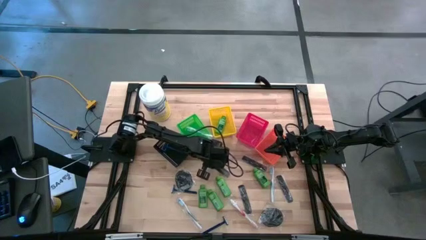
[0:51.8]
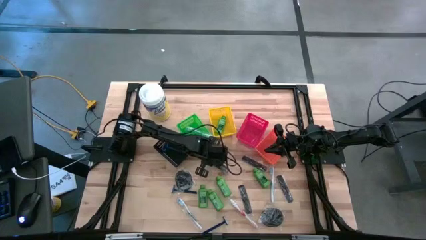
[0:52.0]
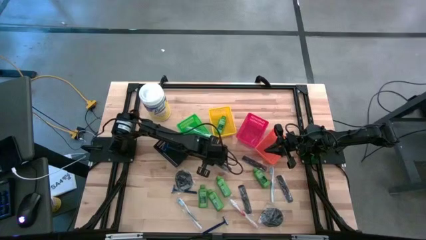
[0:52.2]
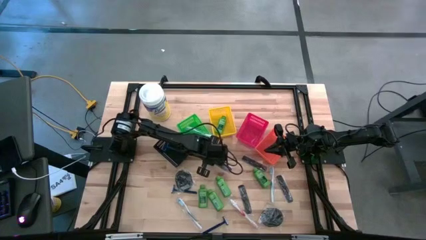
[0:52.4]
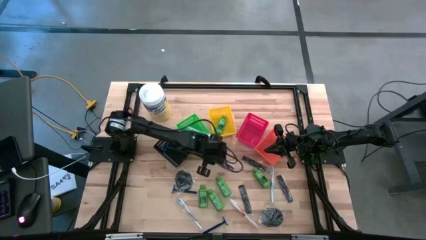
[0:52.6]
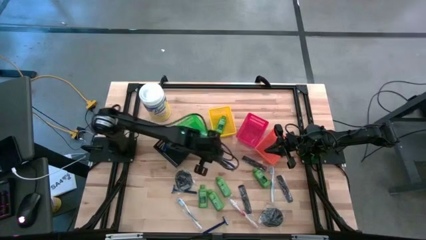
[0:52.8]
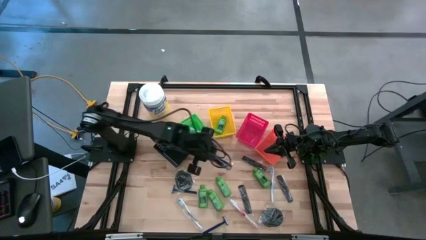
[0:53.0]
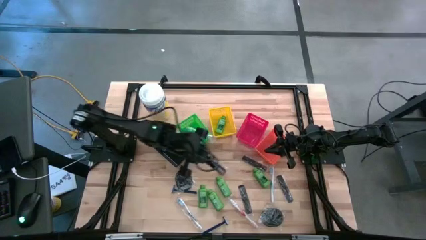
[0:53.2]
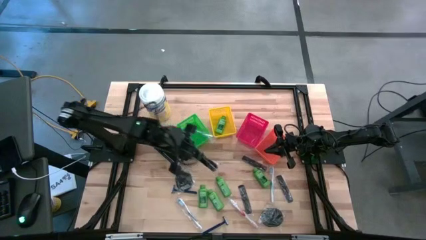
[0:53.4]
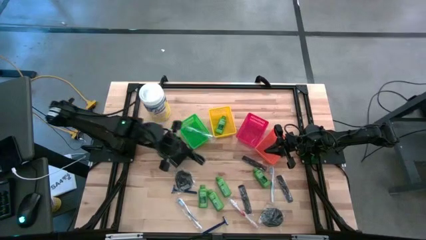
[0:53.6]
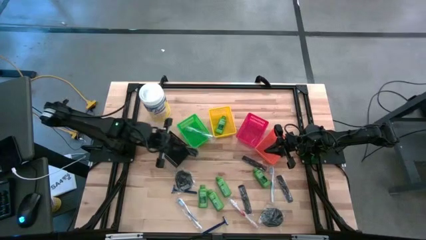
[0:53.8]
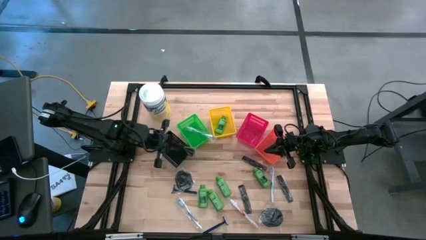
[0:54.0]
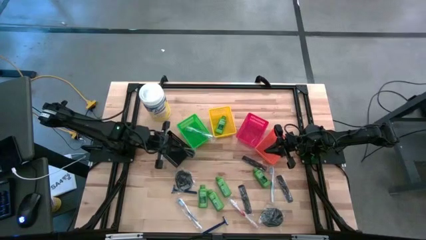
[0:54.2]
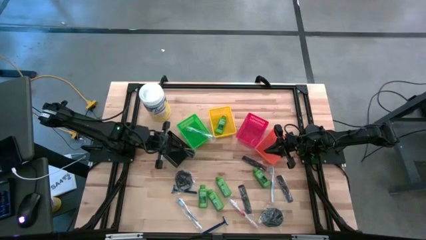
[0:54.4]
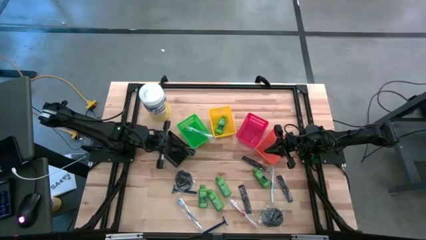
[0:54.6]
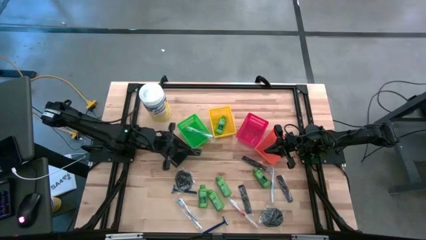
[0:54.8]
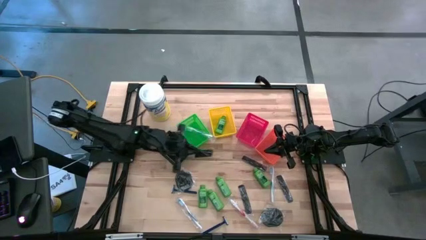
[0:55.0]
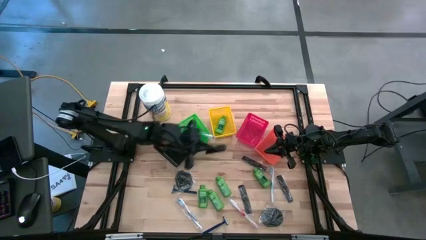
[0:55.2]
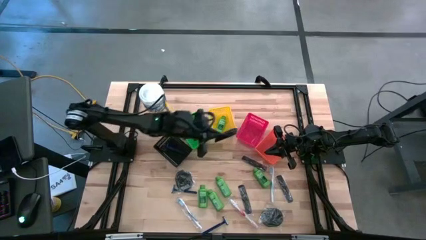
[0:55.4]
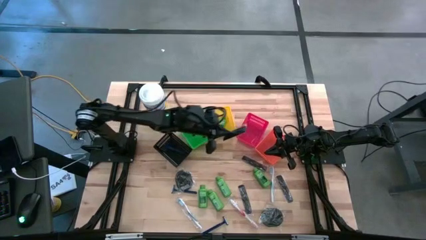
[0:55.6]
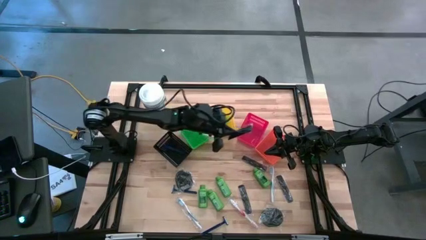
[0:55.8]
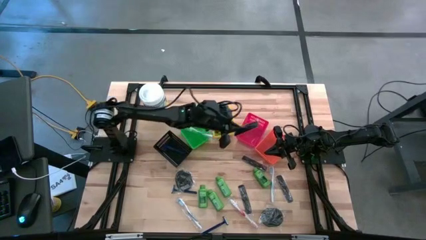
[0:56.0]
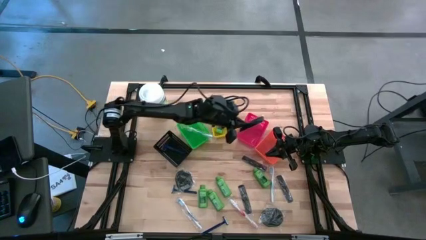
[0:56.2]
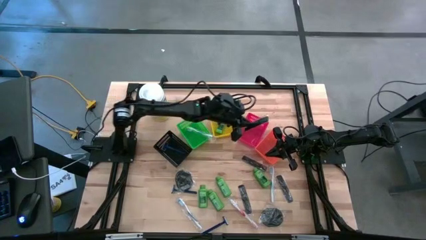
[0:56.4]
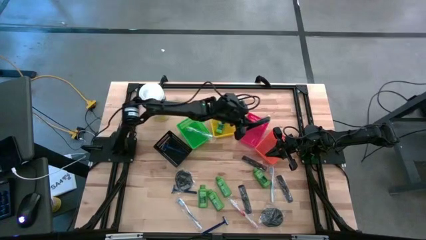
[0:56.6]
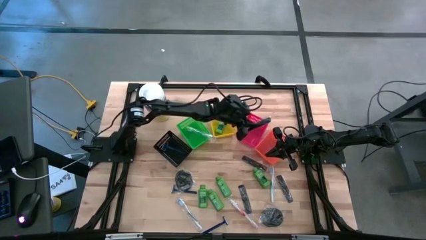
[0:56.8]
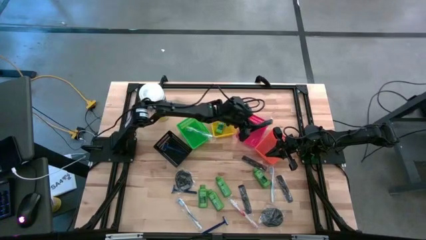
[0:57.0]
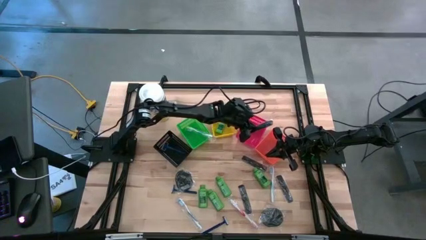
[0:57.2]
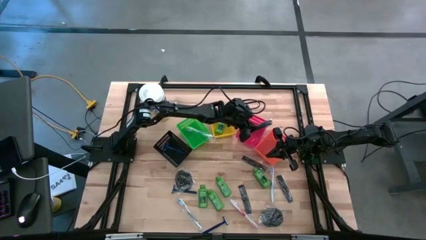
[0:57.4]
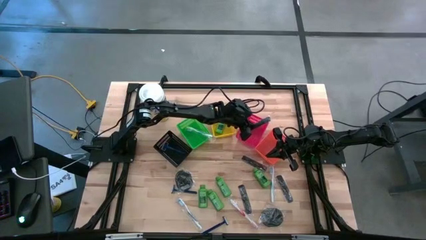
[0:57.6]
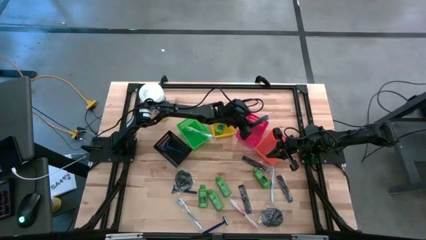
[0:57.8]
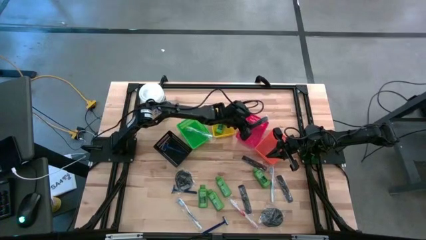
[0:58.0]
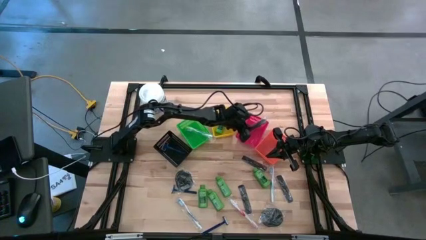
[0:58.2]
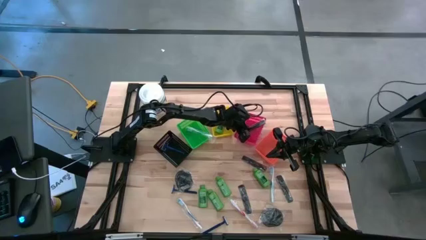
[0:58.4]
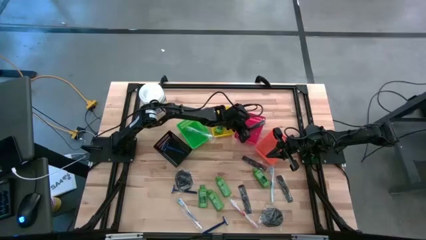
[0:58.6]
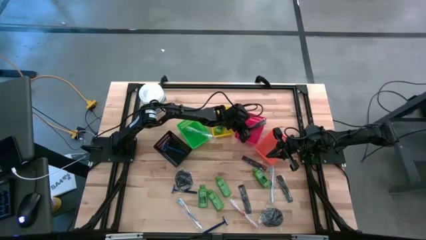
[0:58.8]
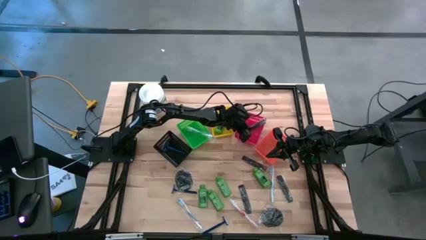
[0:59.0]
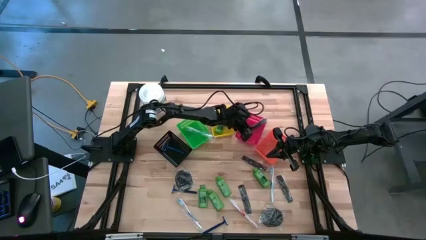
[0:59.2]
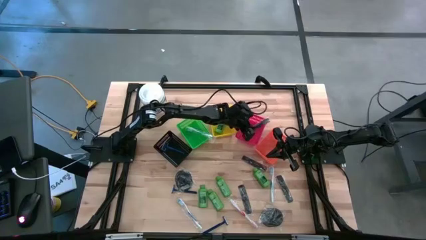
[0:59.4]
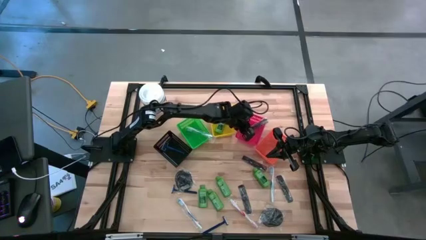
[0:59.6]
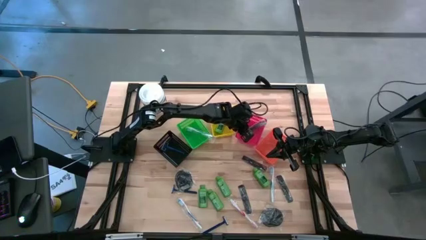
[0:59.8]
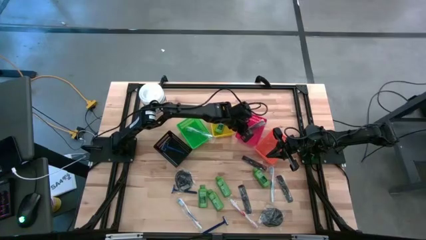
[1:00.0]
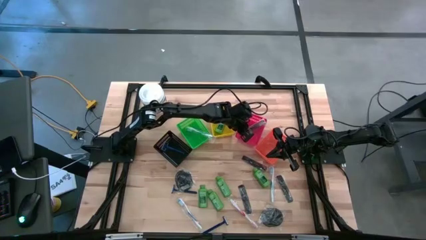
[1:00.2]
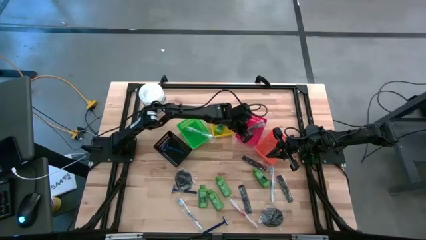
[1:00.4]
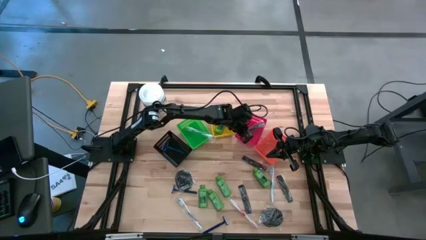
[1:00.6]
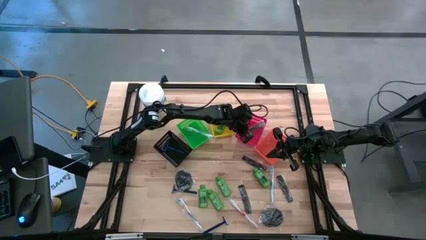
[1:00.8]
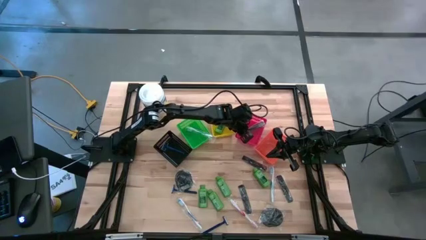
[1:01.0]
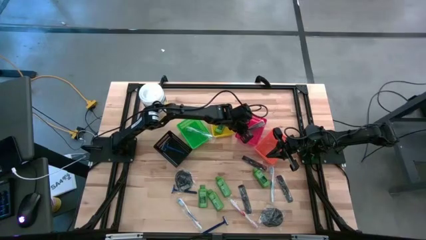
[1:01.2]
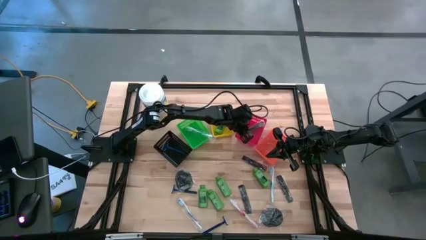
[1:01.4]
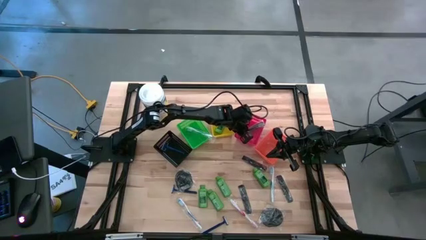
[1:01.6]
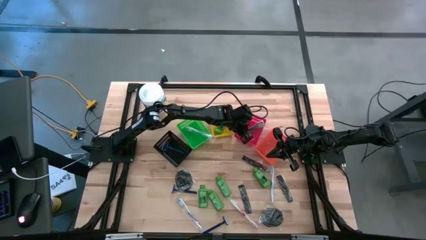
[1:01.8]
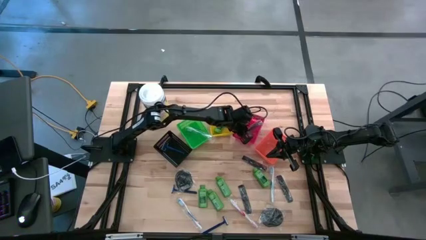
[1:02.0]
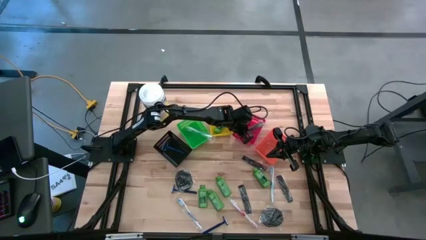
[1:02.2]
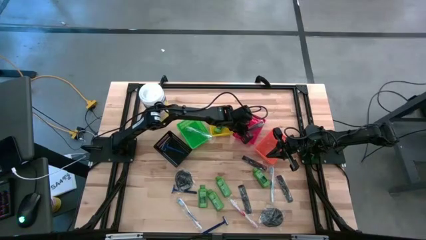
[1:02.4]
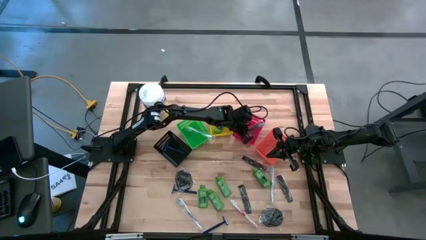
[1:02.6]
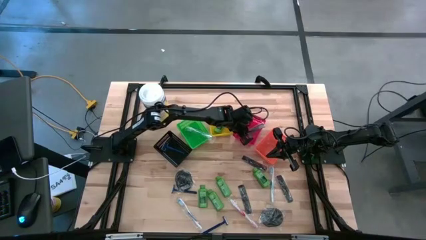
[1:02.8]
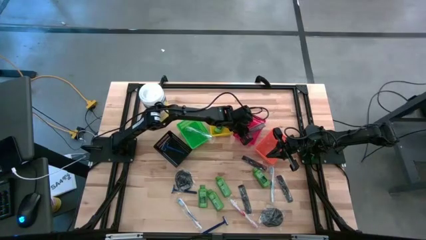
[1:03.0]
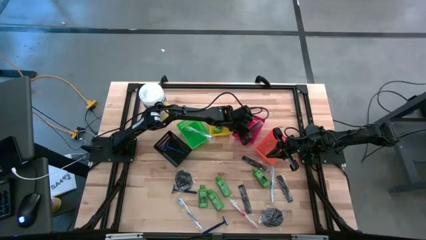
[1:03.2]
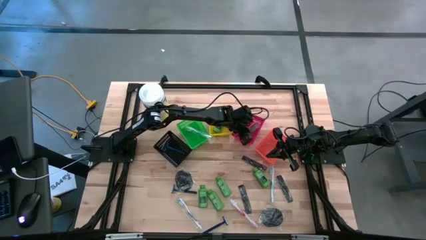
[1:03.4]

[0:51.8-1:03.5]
Task: Pick & Place Travel size toiletries
Put the black hair comb into the red bin
